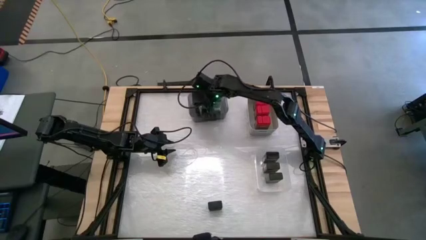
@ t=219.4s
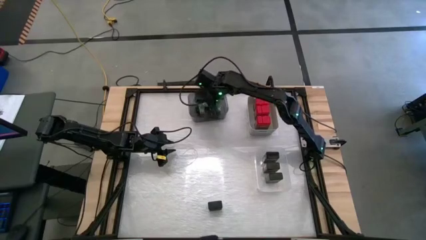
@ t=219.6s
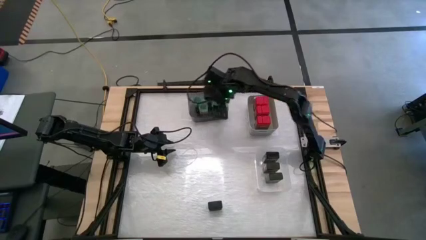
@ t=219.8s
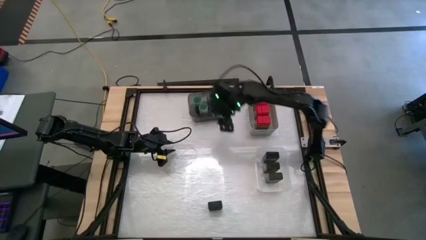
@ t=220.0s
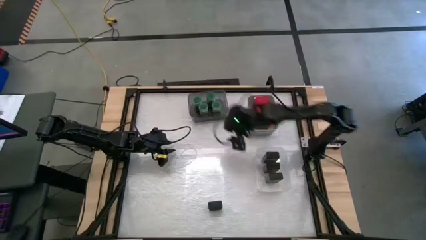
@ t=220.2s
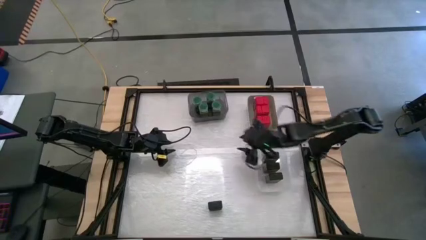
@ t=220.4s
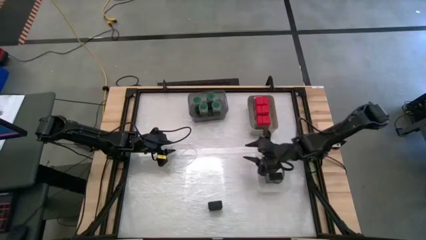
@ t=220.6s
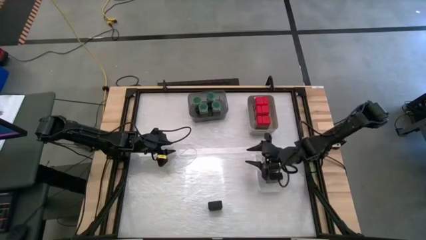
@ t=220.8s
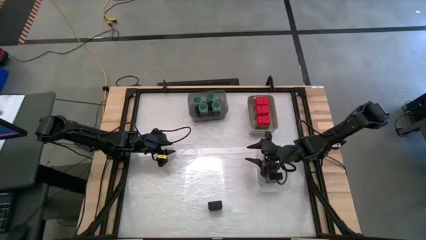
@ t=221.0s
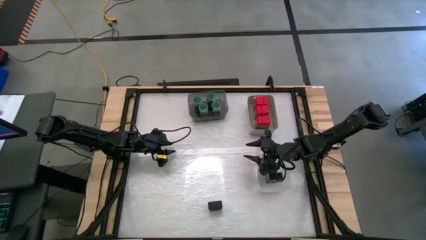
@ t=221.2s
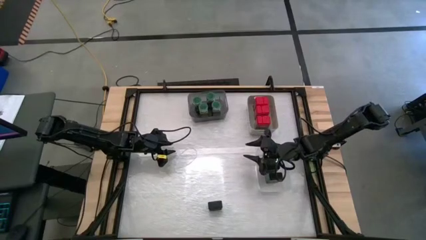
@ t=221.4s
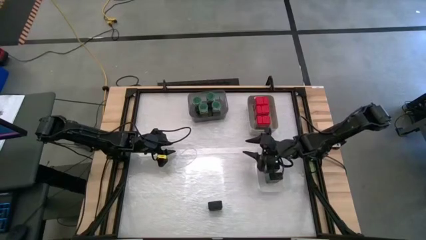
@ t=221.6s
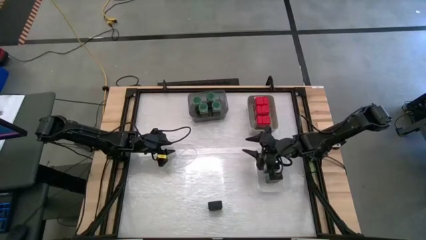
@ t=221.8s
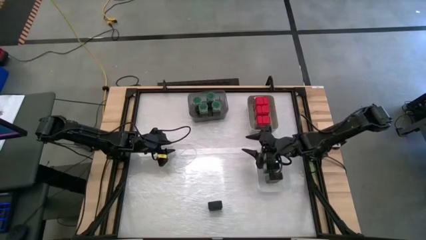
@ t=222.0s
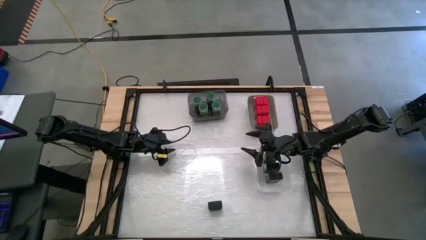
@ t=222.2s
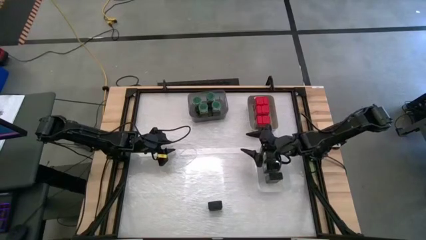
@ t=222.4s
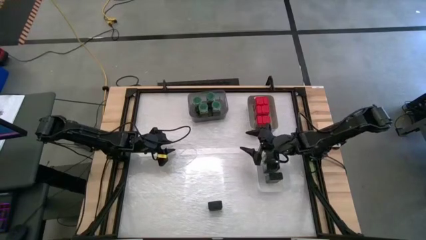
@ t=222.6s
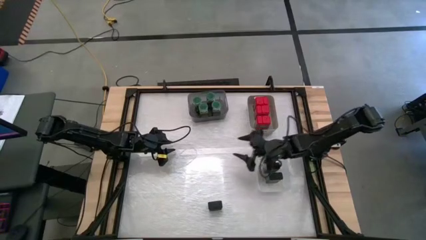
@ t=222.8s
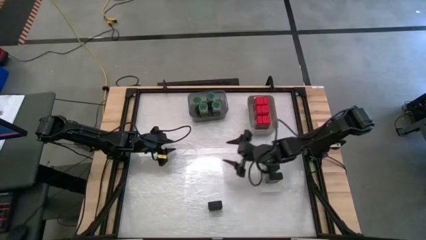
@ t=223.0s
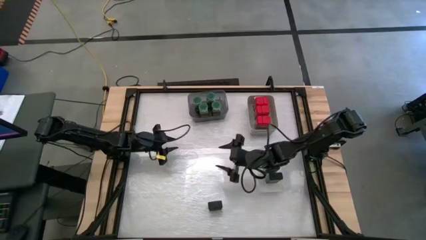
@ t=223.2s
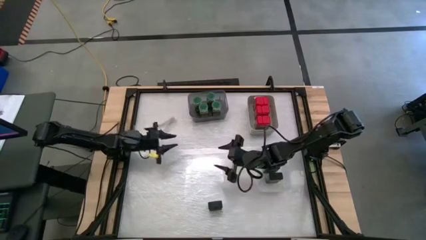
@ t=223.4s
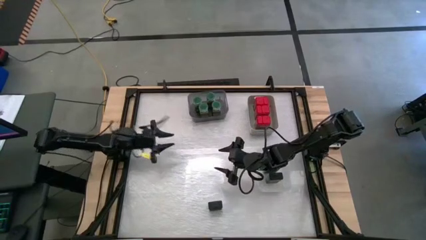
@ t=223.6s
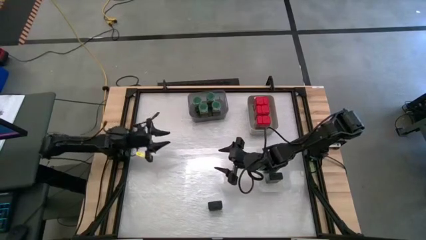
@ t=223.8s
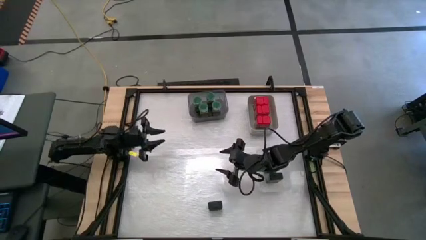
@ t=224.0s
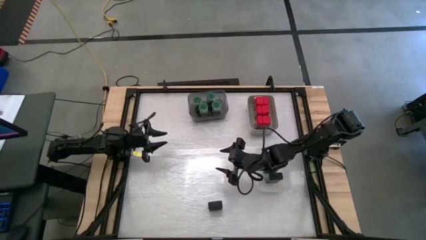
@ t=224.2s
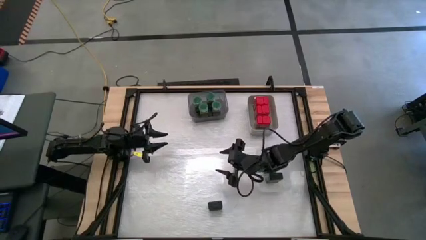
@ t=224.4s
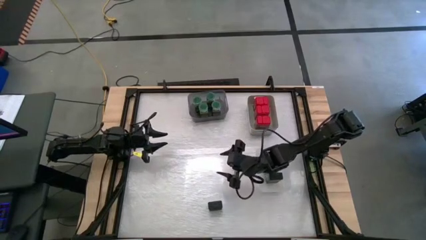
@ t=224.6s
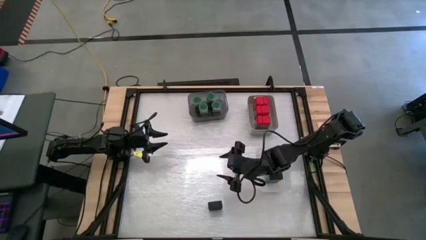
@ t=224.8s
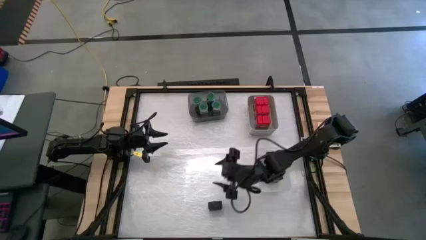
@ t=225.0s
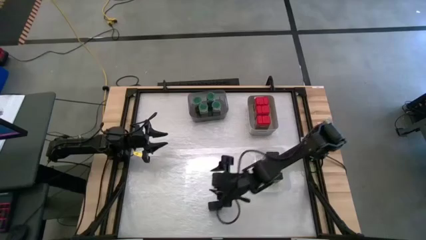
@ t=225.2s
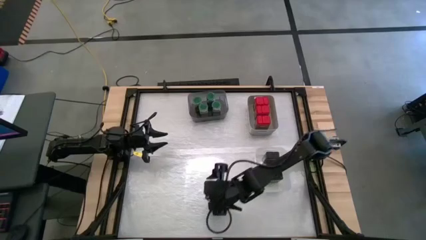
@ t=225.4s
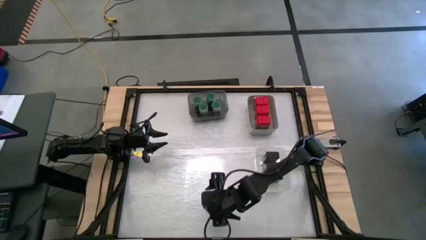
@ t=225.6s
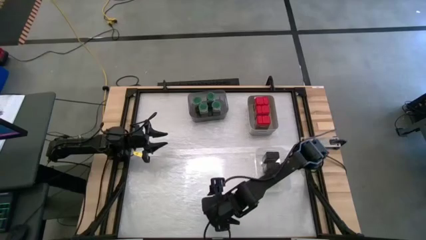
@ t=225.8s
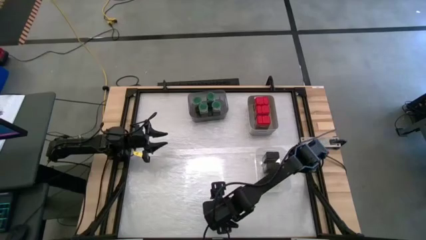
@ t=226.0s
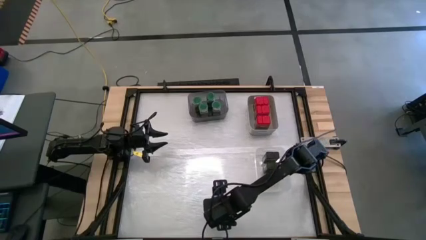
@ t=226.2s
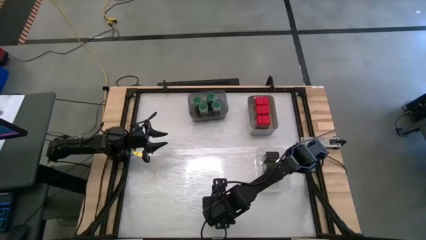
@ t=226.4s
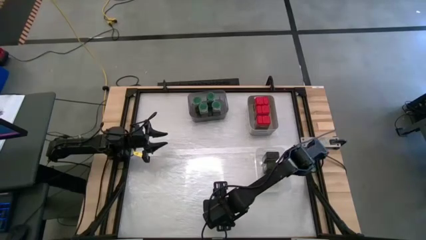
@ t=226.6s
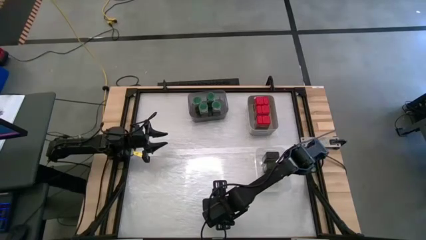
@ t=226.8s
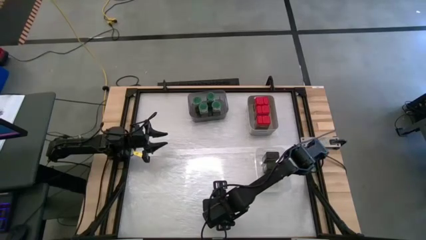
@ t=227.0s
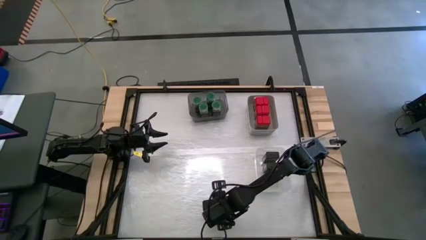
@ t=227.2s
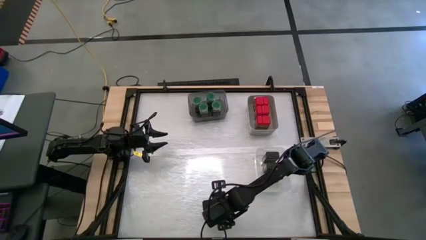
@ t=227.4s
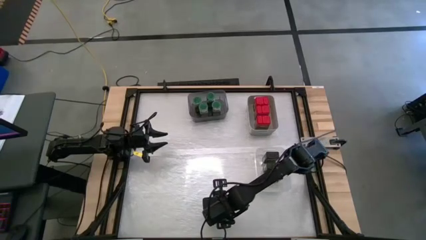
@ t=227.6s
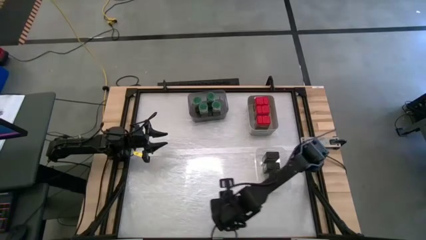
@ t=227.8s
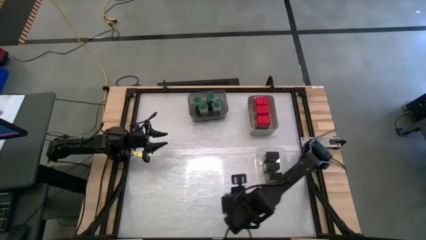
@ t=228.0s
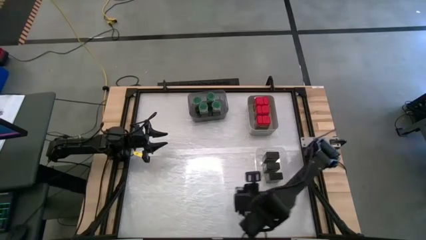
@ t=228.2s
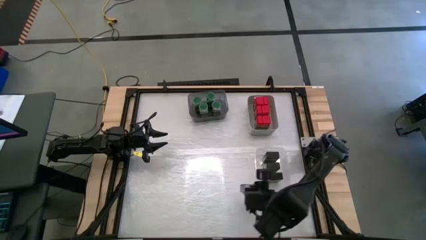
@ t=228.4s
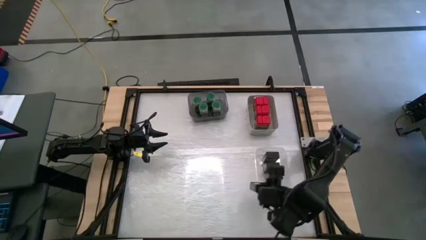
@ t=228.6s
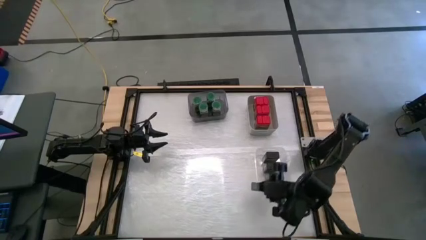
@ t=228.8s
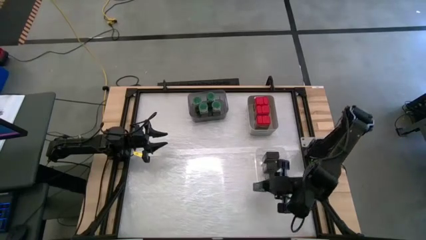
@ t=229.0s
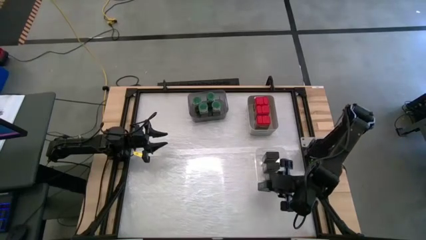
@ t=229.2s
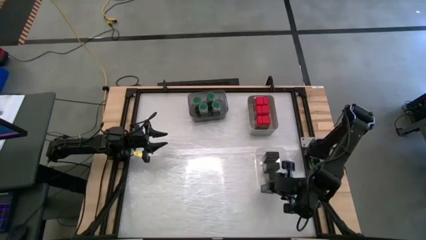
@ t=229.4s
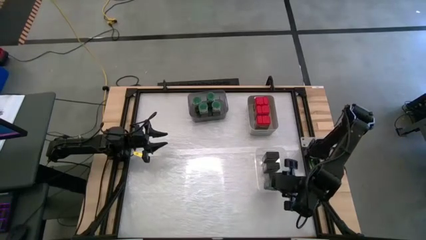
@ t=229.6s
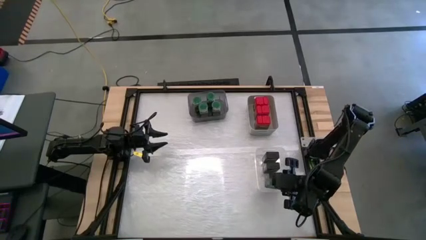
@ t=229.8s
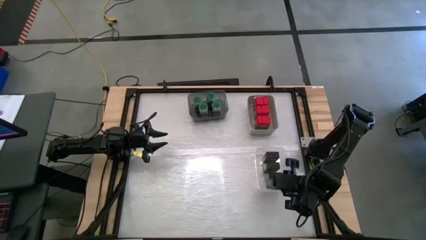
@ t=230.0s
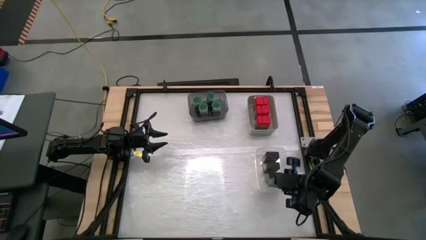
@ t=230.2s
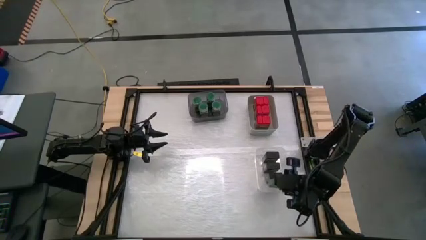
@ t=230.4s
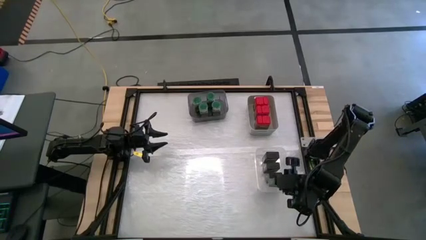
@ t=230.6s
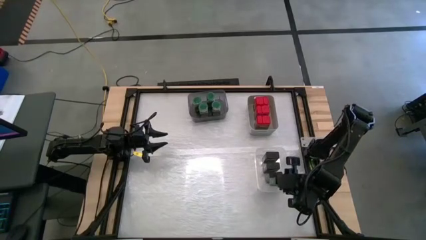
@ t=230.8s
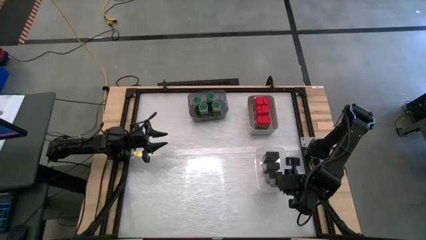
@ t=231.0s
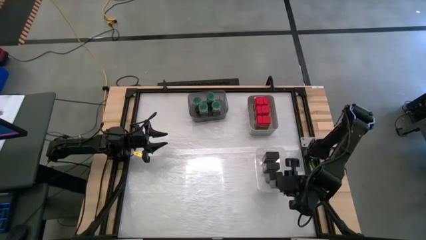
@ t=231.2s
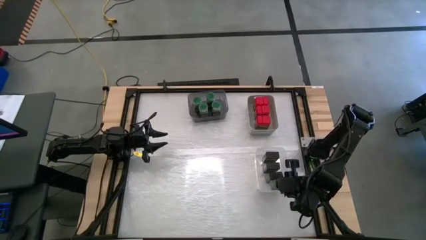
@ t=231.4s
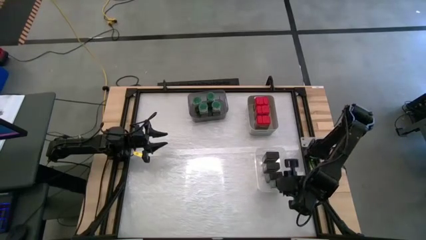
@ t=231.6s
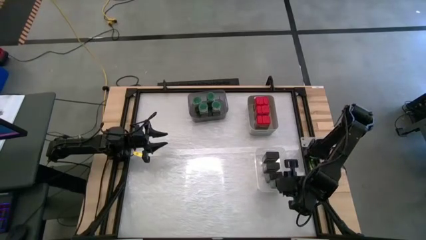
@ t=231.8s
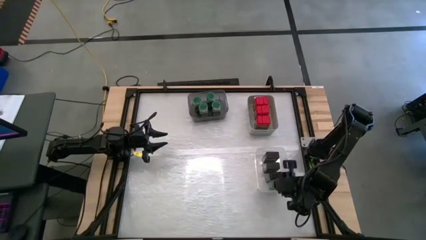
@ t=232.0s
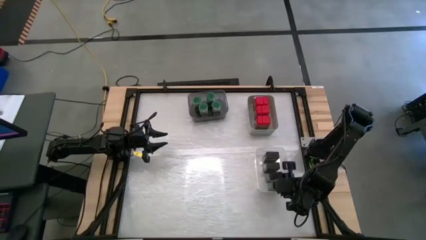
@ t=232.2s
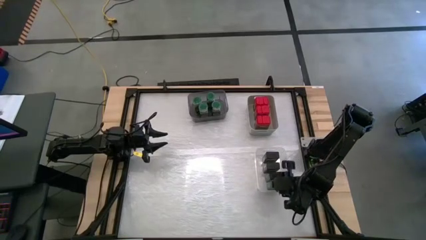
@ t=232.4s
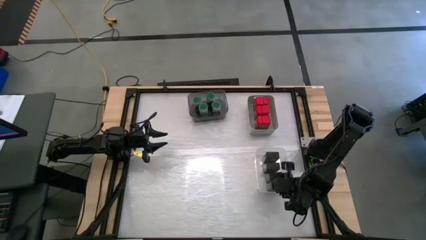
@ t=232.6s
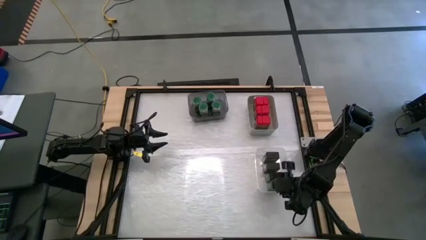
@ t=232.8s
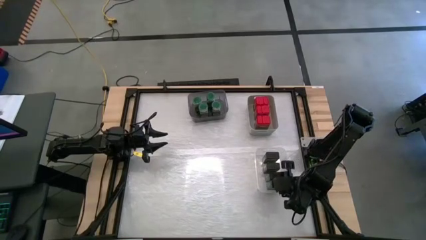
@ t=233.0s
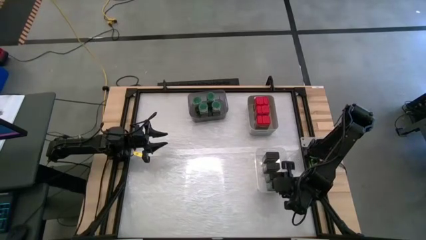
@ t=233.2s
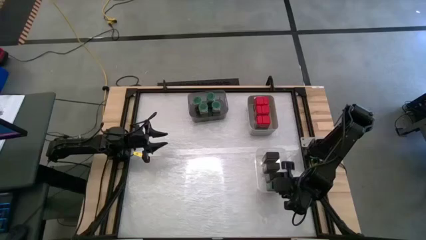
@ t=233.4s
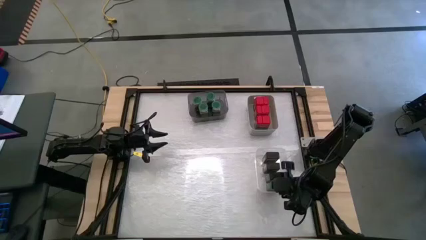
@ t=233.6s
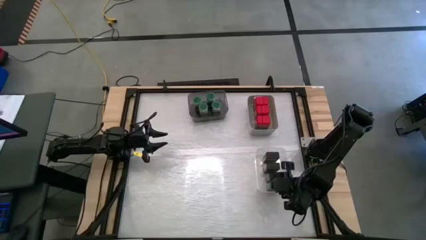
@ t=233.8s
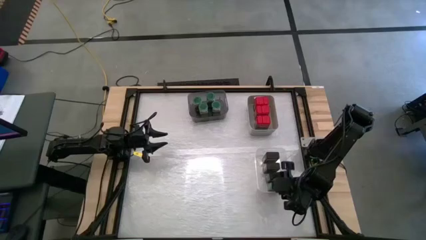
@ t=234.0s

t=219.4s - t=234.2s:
Task: Sort spices by type
Put the black seasoning can into the white transparent bin
